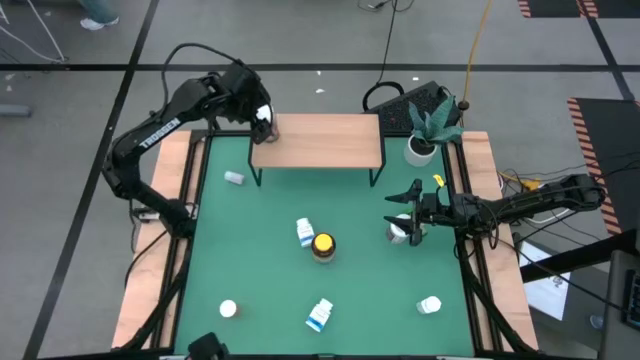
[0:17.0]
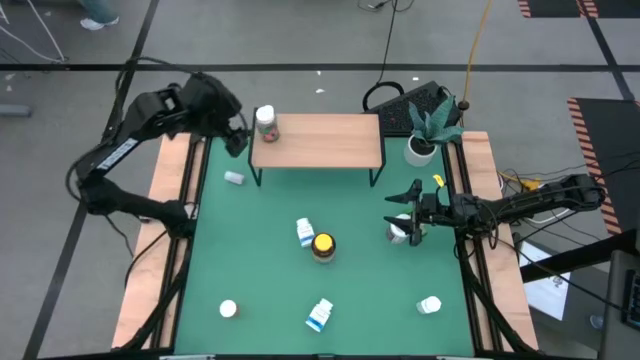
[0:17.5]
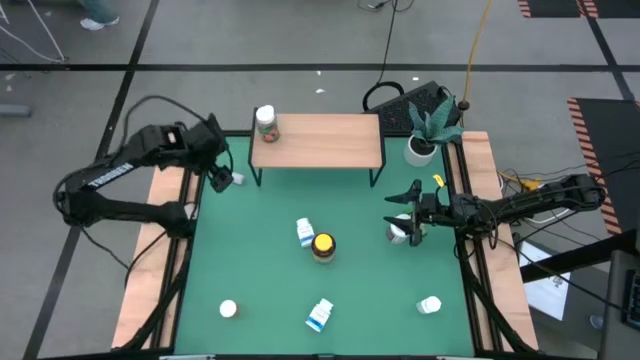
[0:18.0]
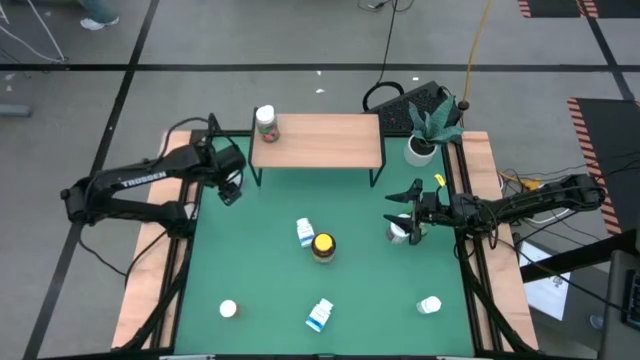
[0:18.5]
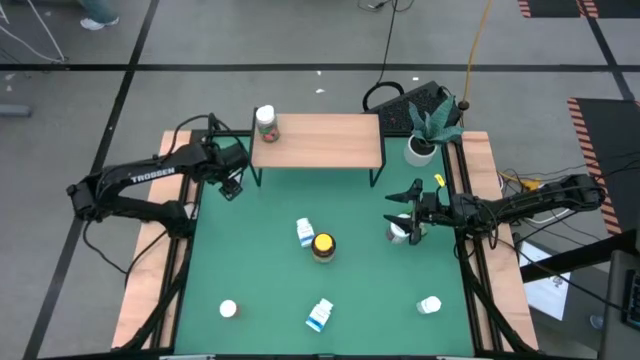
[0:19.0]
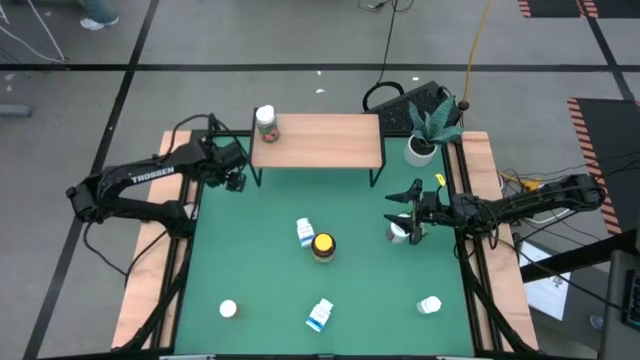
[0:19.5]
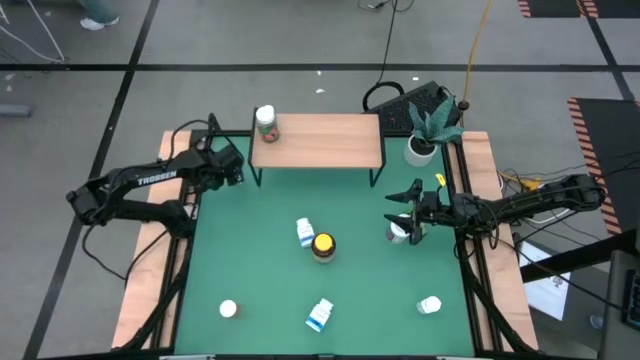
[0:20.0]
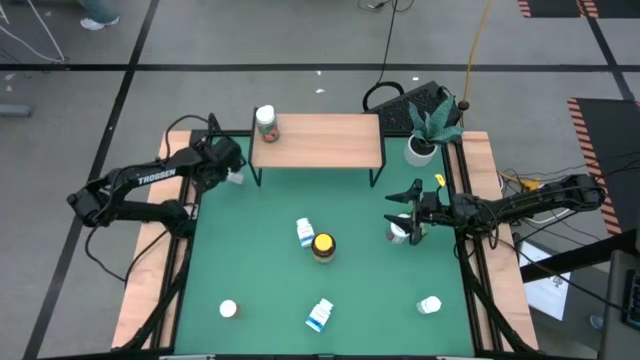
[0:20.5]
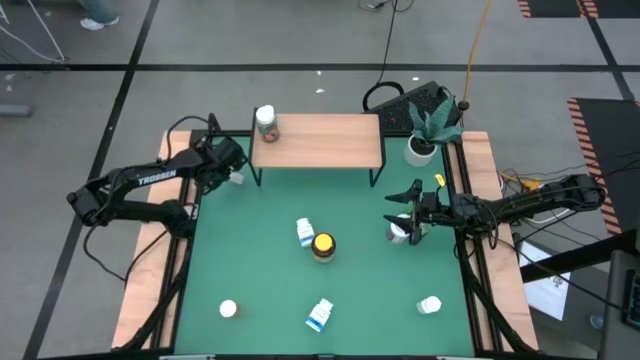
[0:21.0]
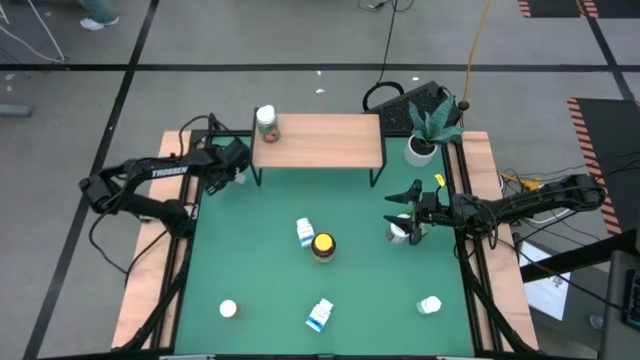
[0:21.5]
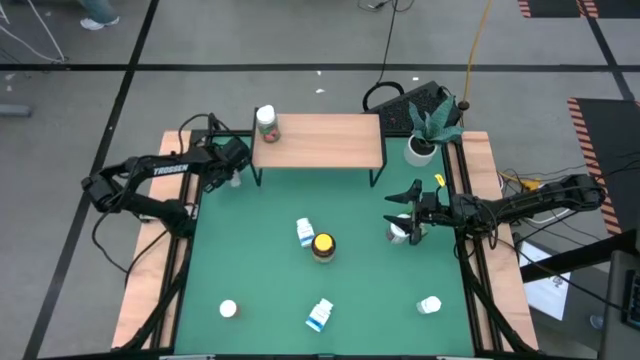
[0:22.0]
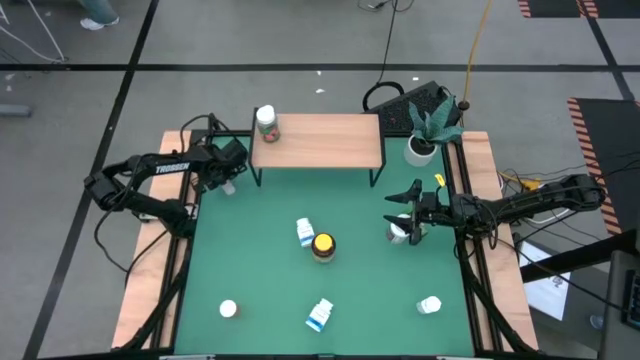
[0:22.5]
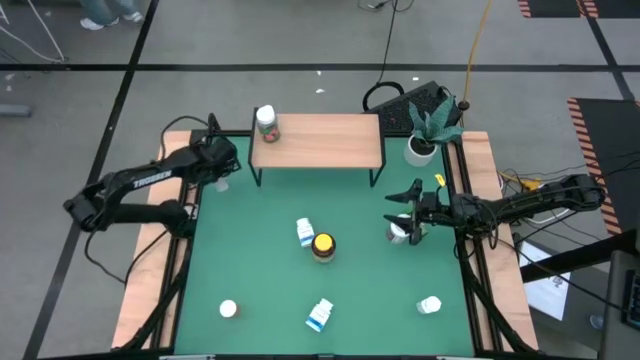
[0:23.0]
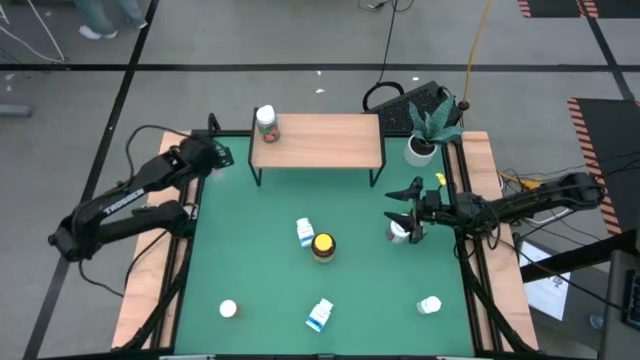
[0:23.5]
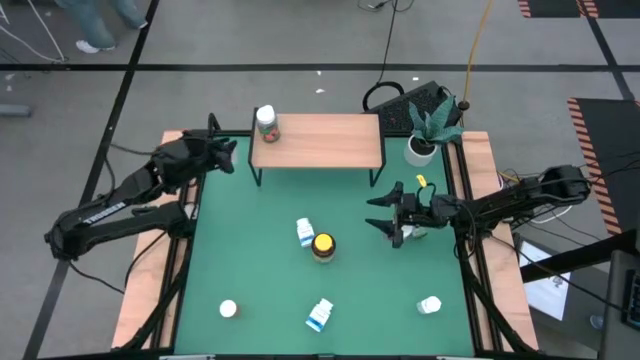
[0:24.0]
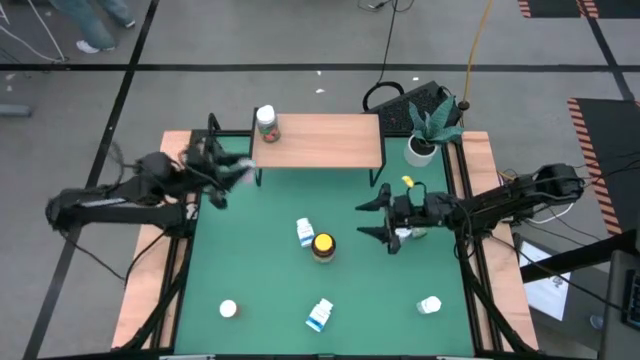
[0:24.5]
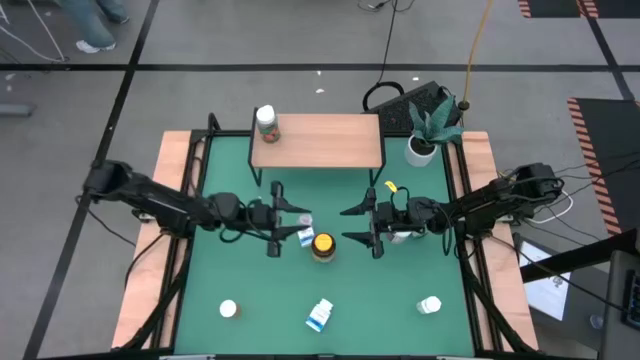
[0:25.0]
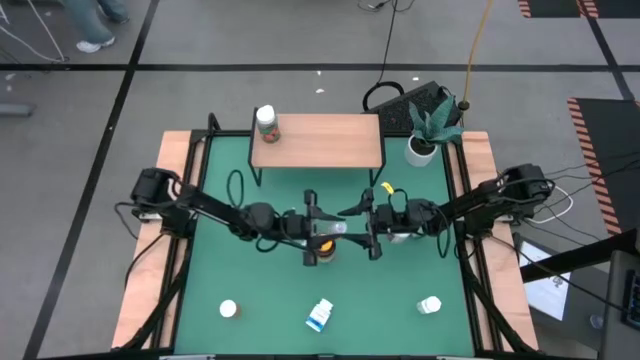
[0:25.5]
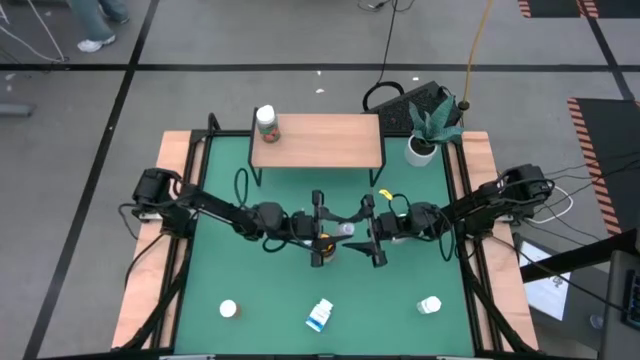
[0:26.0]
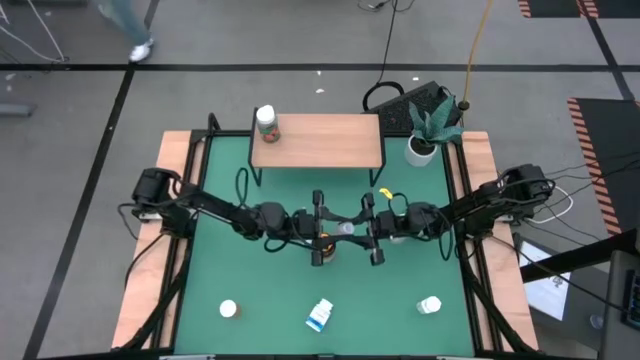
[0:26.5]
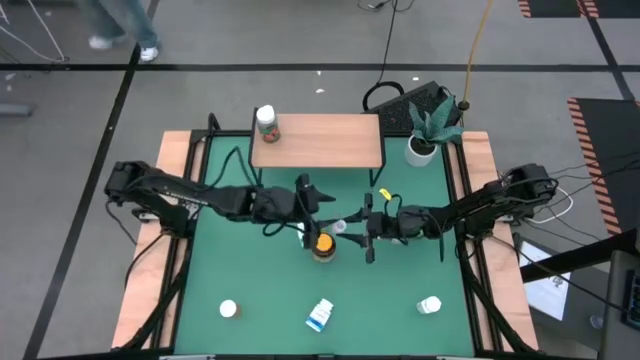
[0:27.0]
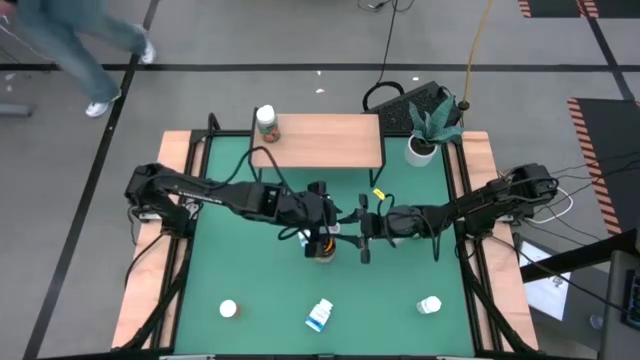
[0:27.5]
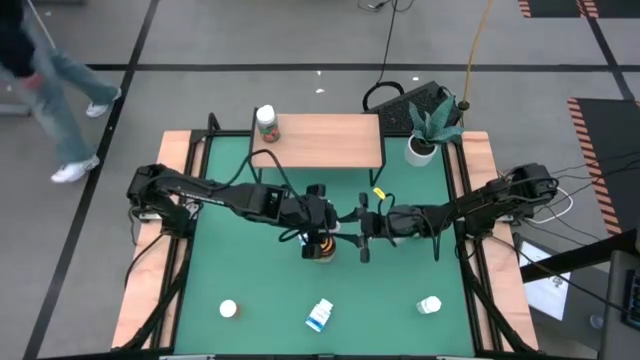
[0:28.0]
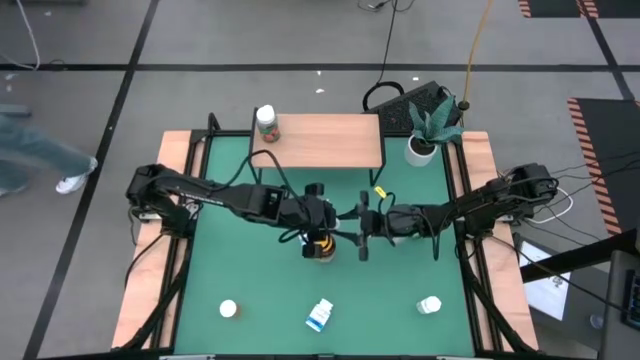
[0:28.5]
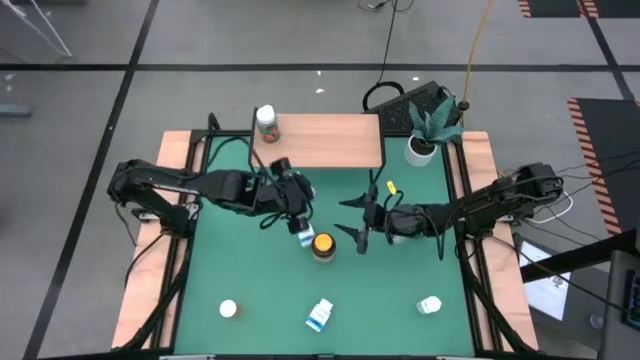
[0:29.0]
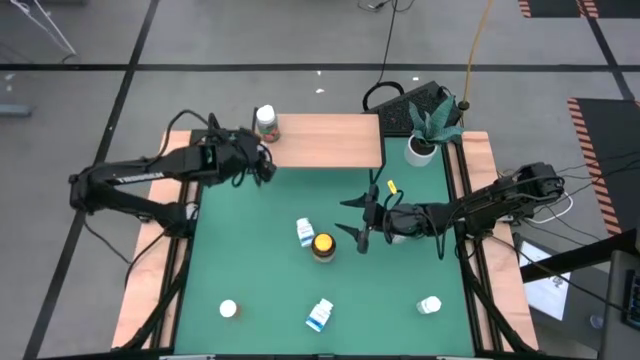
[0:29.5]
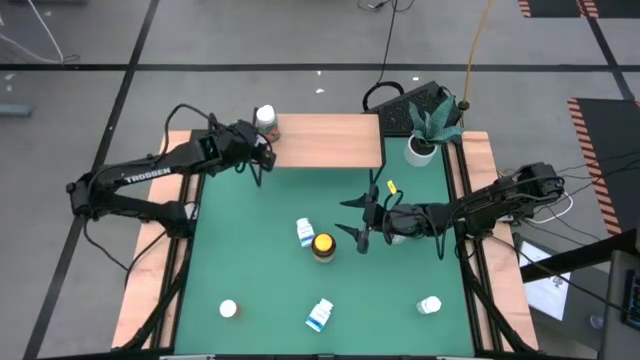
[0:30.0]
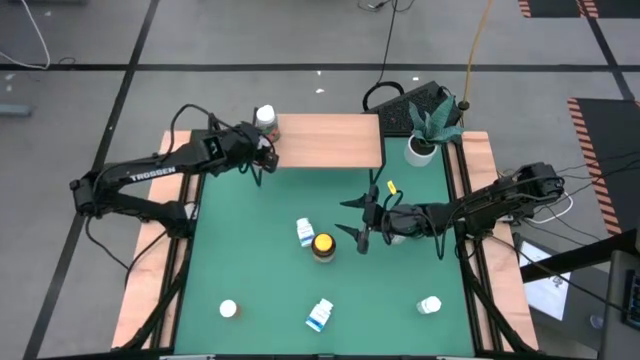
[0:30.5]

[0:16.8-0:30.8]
Task: Pick and place medicine bottles onto shelf by color
Put the transparent medicine bottle on the shelf

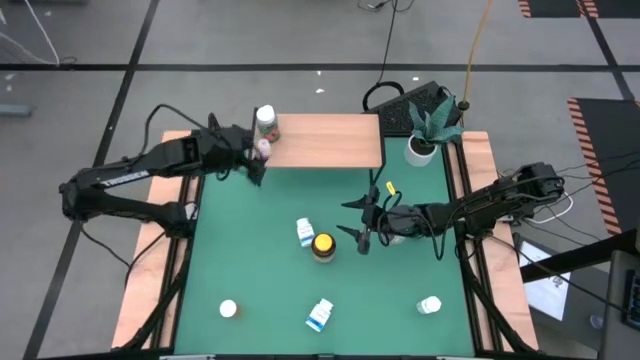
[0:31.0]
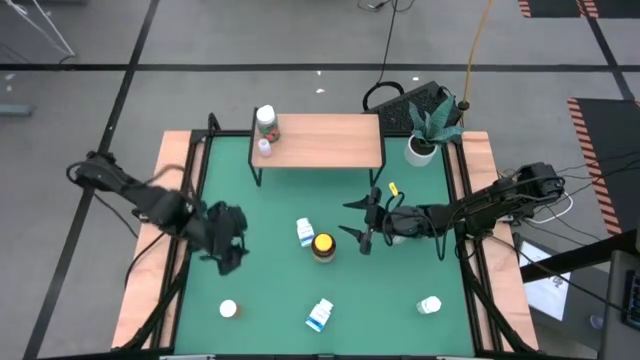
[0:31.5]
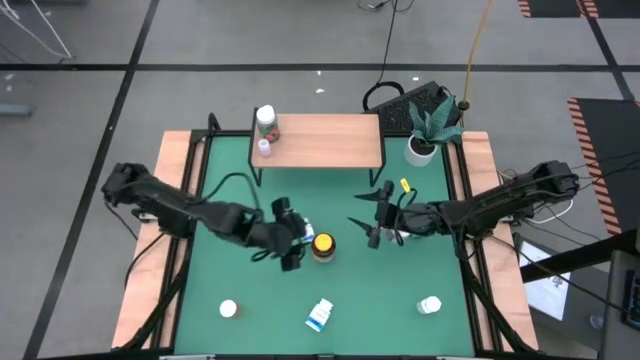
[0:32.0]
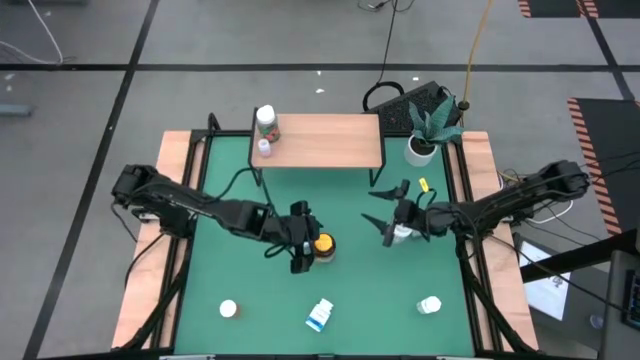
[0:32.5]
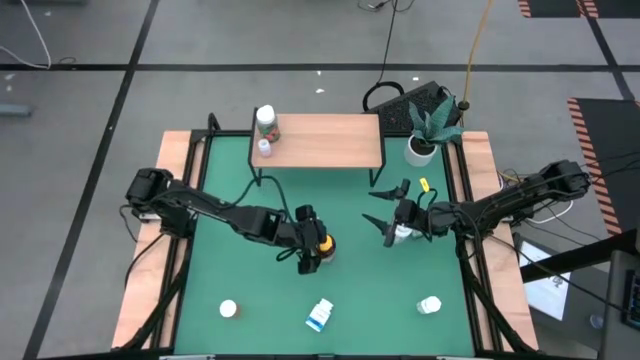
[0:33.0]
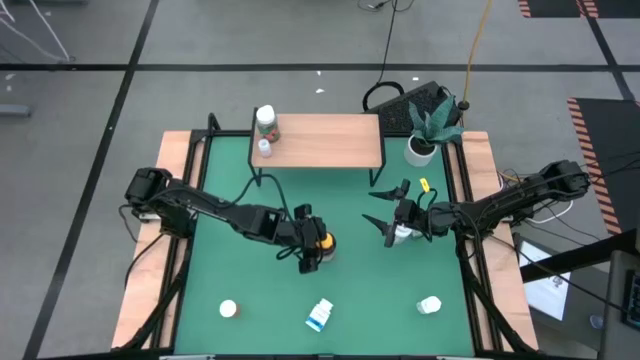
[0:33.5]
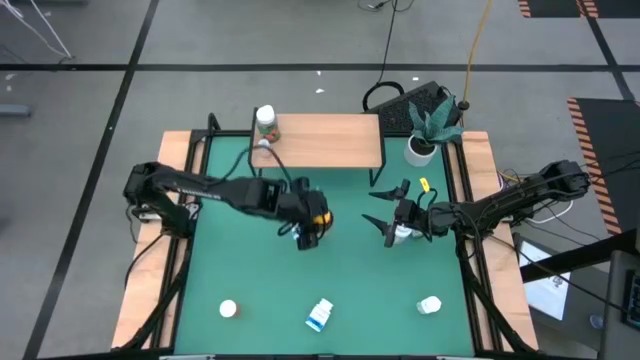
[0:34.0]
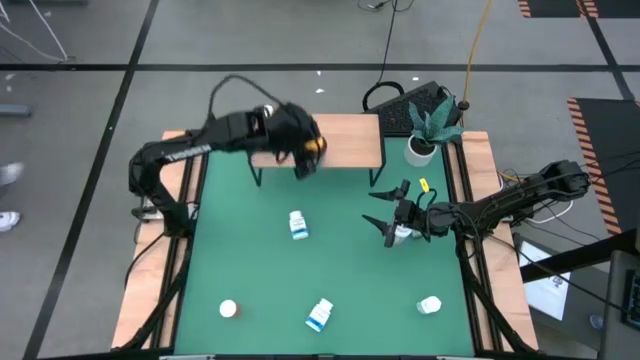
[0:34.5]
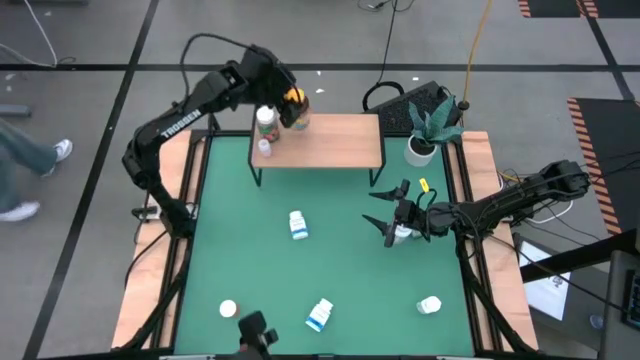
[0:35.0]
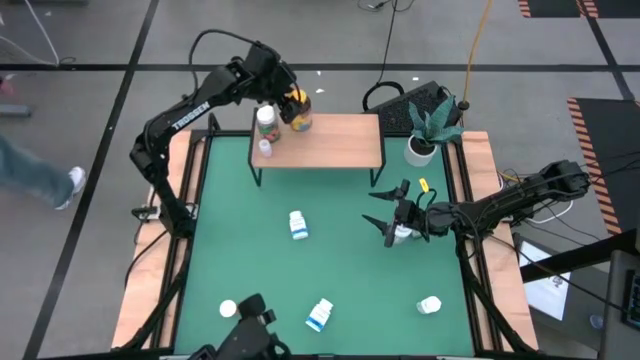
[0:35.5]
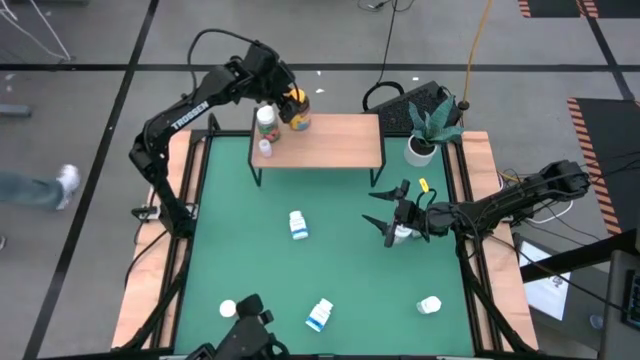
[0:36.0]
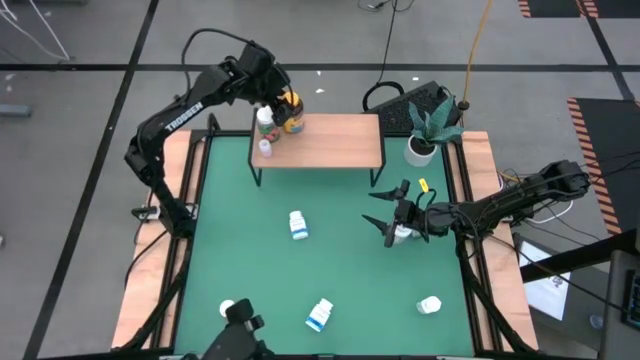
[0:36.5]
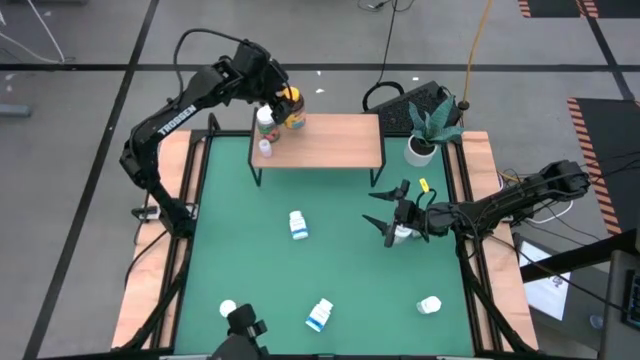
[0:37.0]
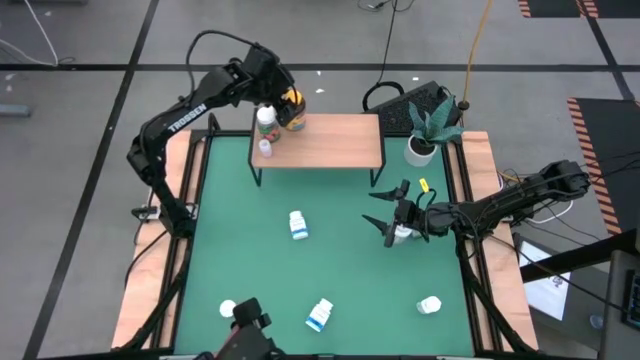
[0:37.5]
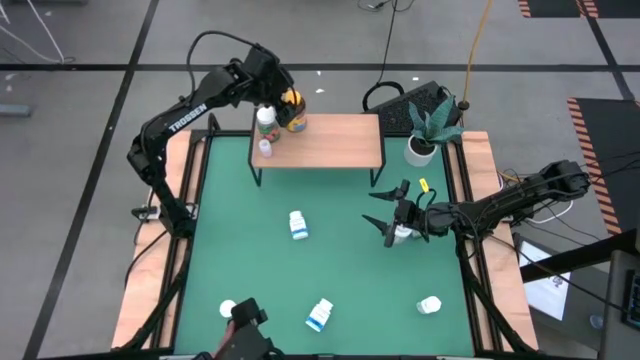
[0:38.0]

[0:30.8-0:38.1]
Put the yellow medicine bottle on the shelf
